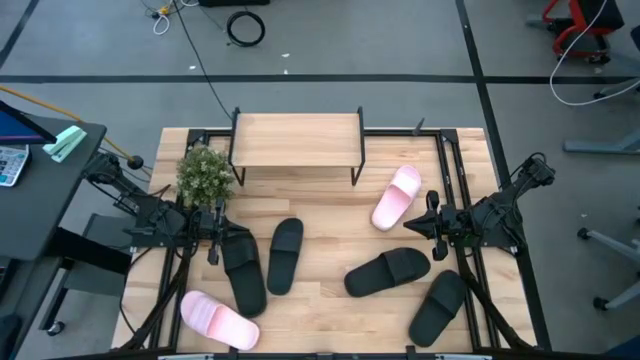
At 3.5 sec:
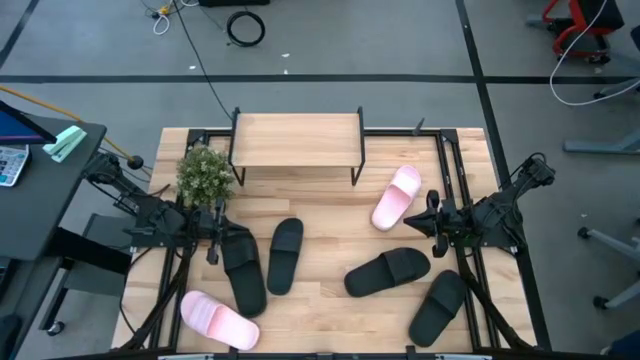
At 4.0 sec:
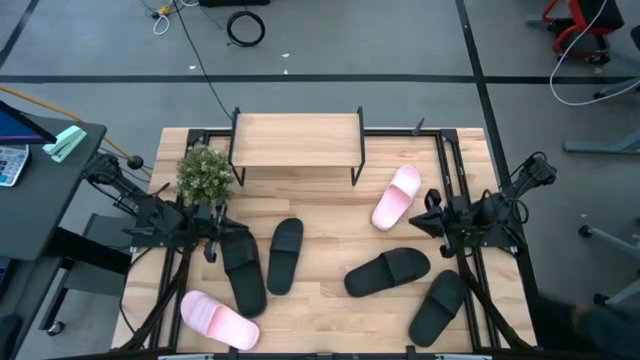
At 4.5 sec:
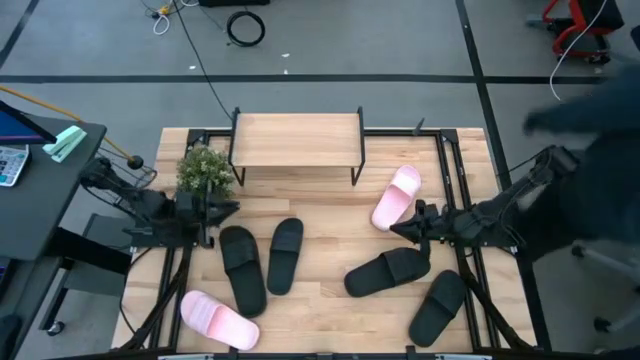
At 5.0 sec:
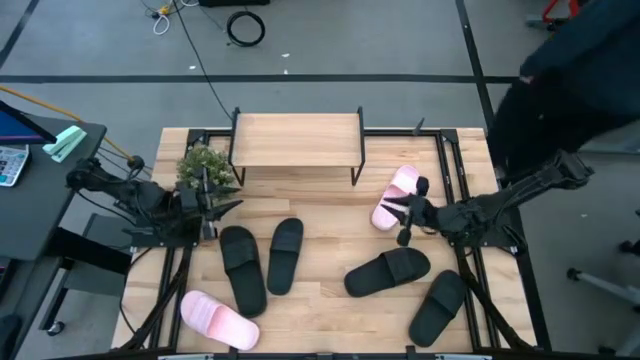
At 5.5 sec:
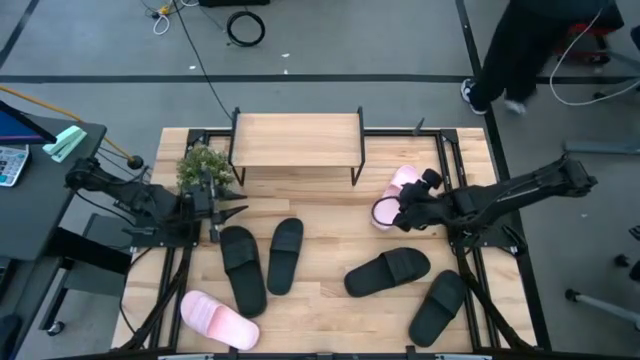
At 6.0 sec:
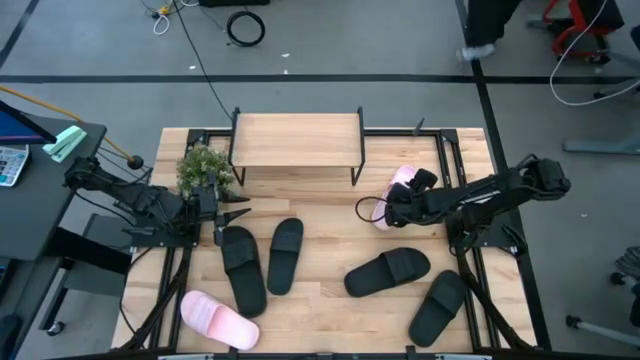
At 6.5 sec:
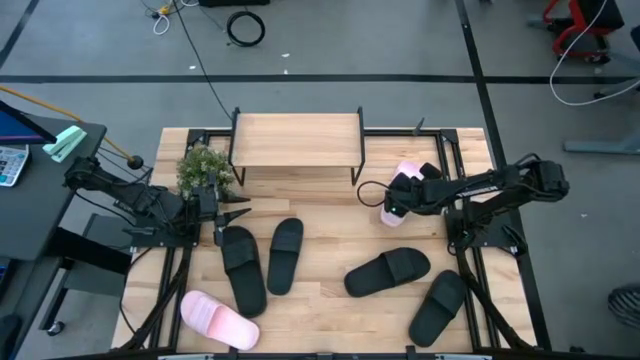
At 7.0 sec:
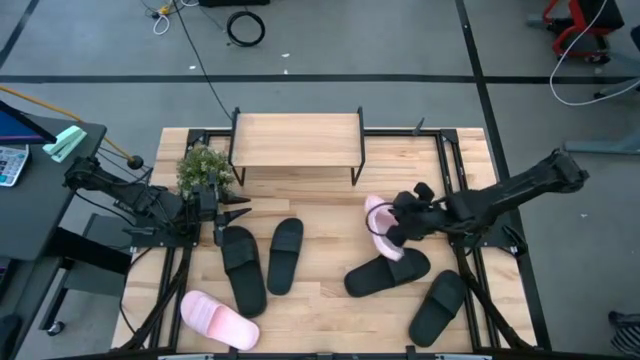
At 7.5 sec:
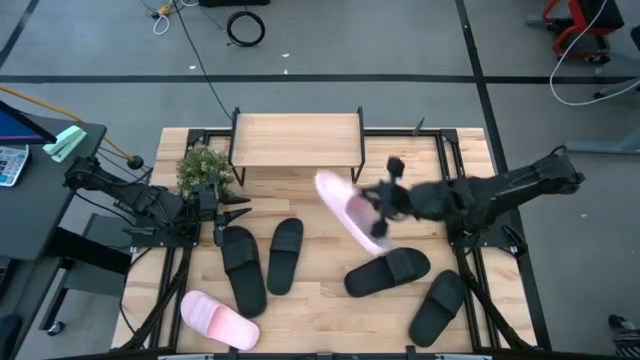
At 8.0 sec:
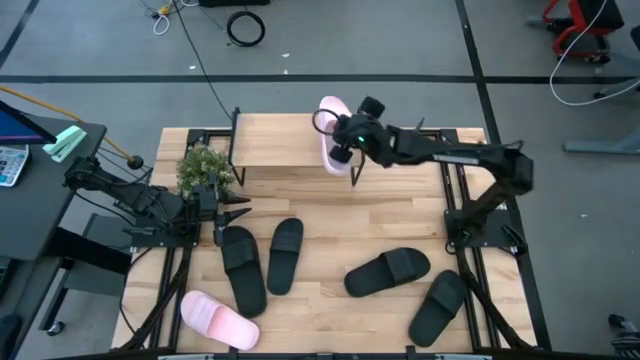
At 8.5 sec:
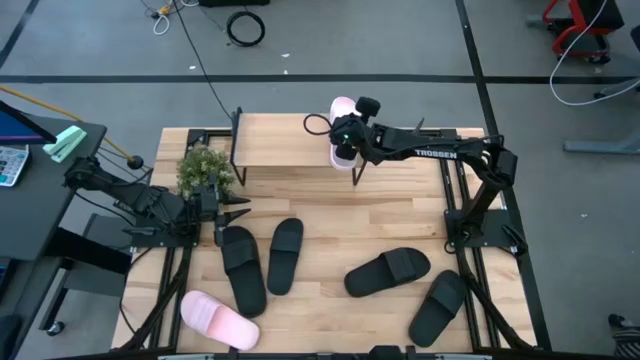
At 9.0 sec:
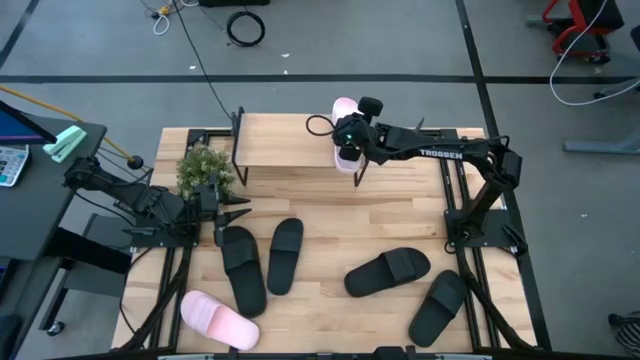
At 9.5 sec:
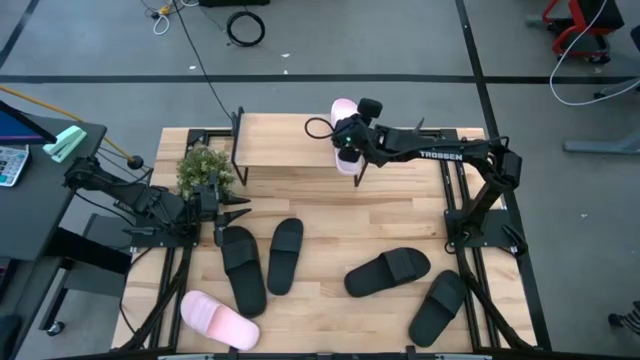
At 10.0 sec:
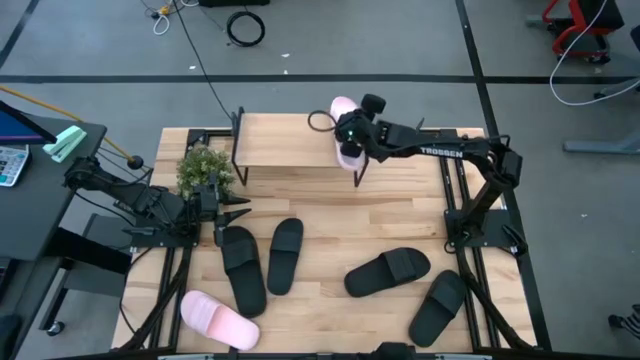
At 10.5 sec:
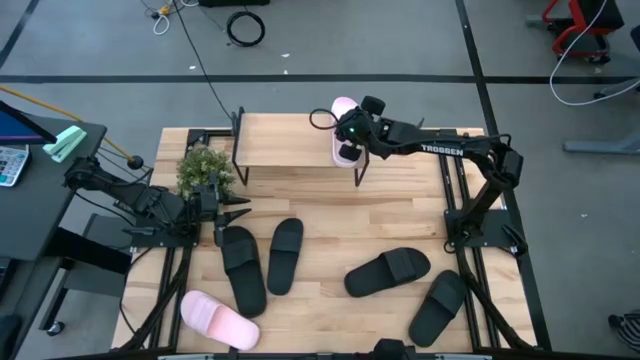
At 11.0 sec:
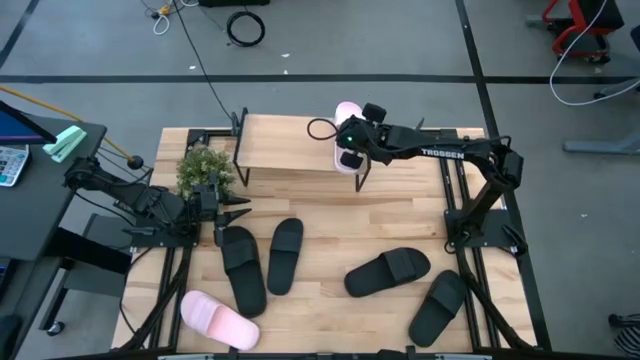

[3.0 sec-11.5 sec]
Task: Pick and place slides into the shelf
Put the right pink slide on the shelf

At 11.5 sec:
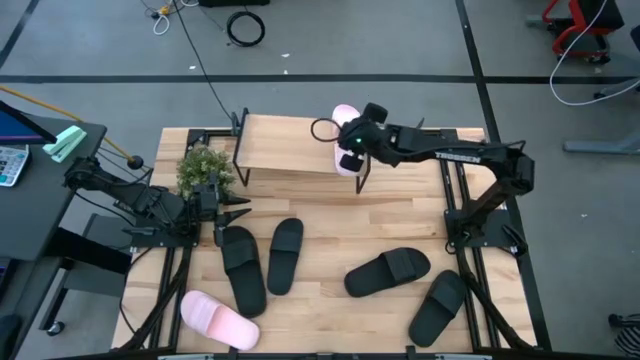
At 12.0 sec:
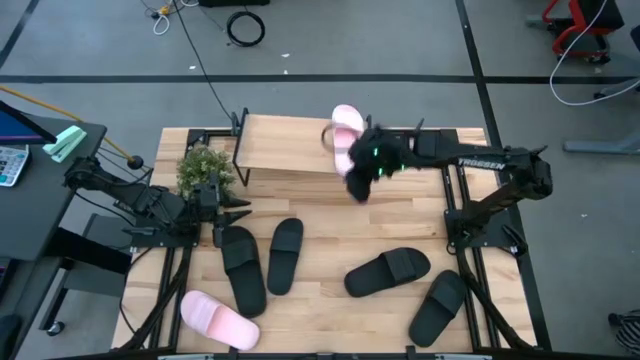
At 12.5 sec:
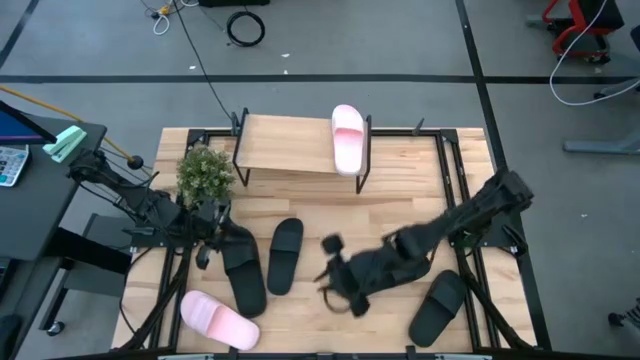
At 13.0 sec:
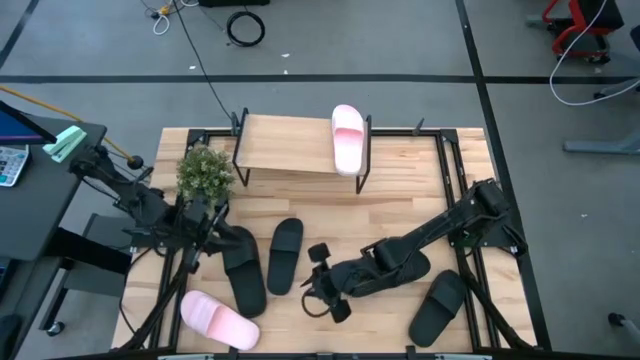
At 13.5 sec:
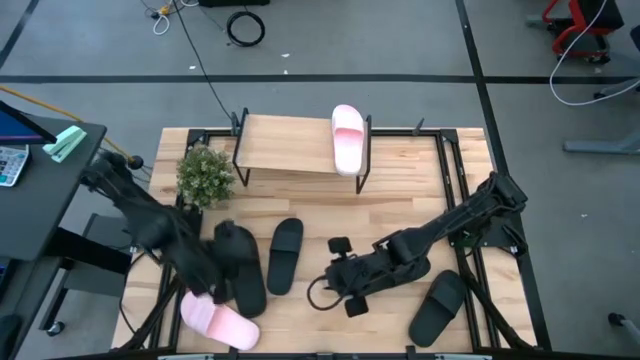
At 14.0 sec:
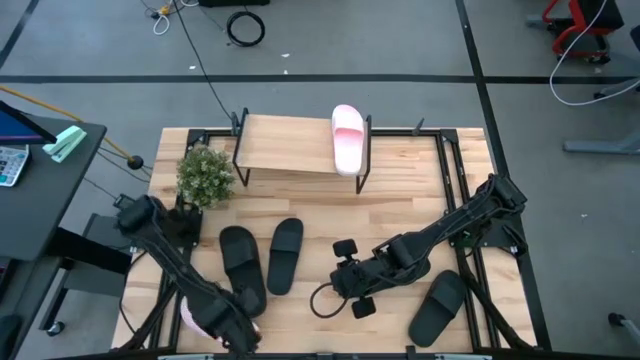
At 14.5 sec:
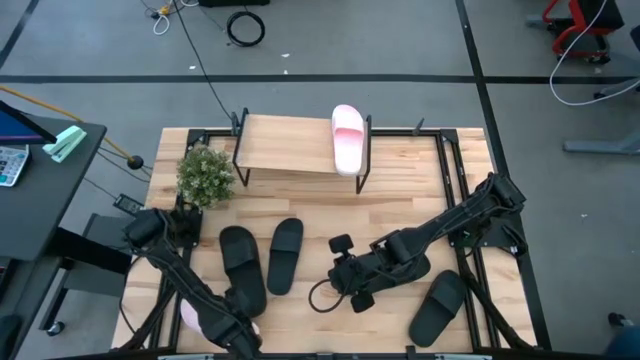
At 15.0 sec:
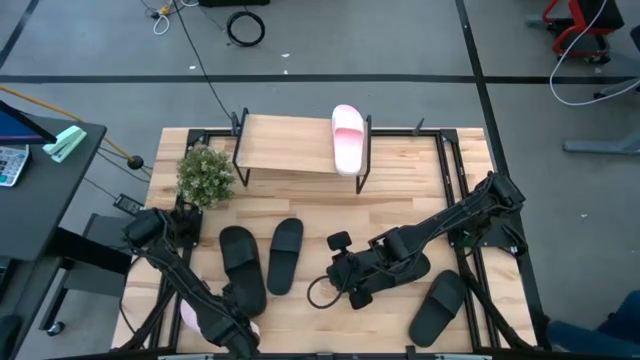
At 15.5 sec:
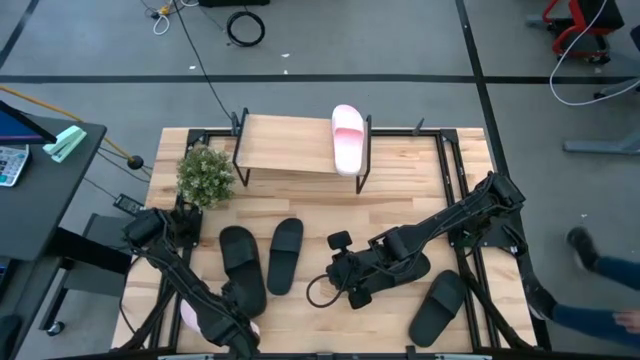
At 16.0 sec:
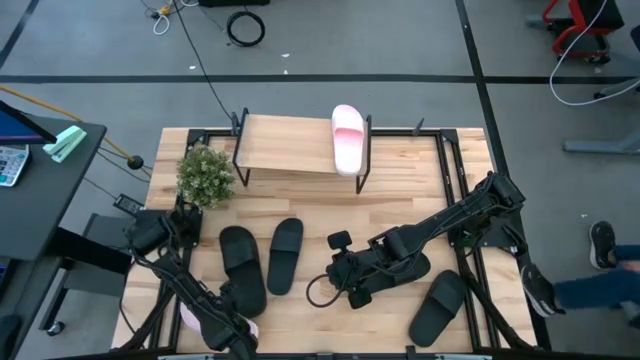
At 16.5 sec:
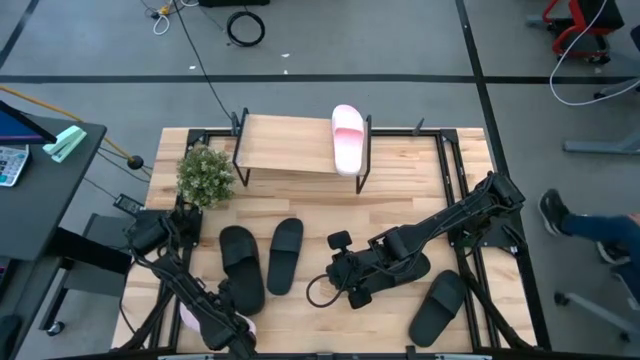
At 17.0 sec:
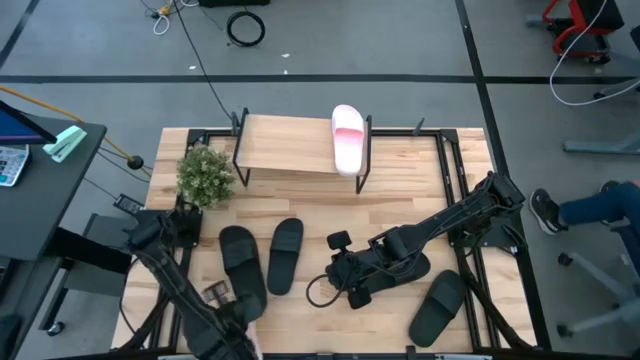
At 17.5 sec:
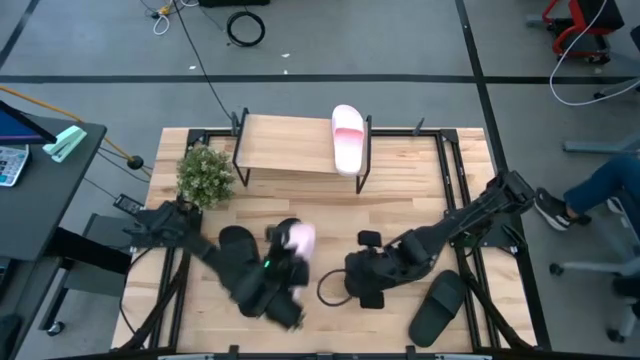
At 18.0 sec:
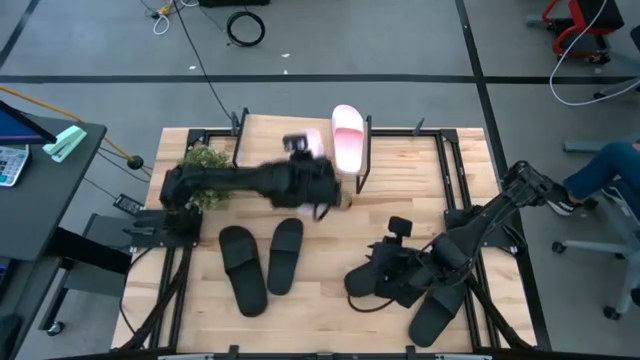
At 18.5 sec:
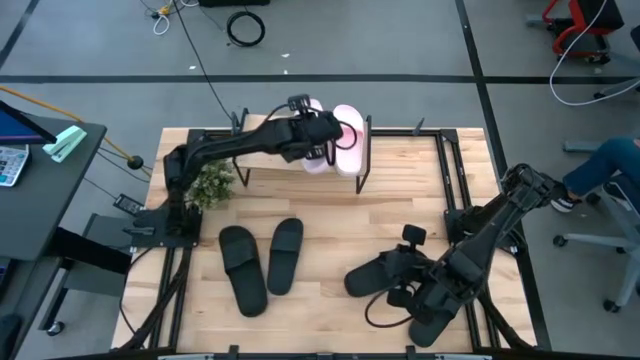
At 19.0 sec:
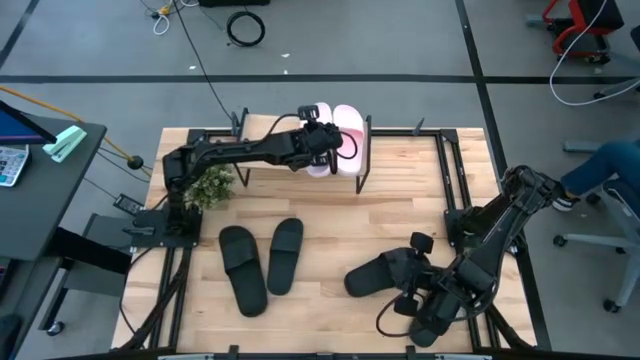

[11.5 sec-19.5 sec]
Put the pink slide on the shelf

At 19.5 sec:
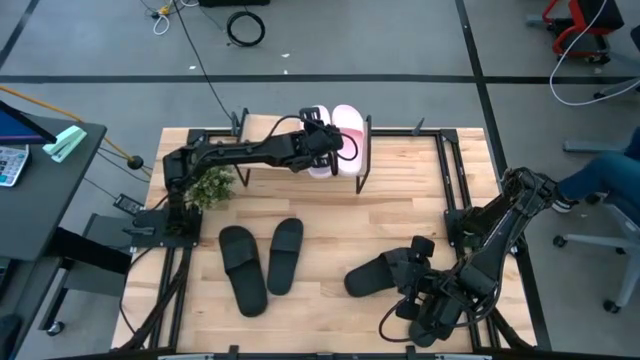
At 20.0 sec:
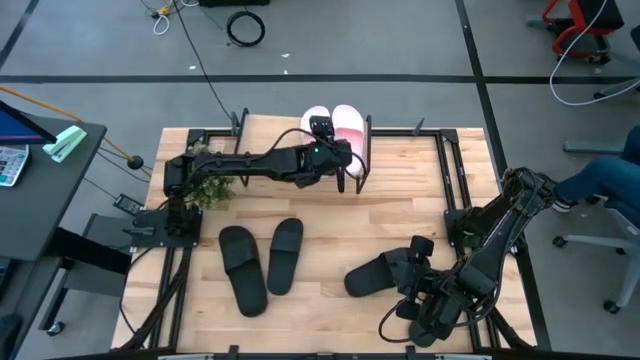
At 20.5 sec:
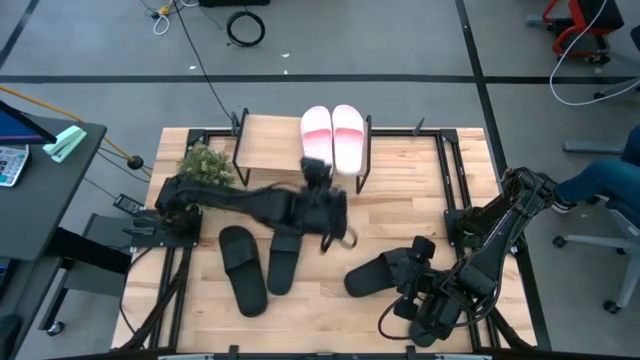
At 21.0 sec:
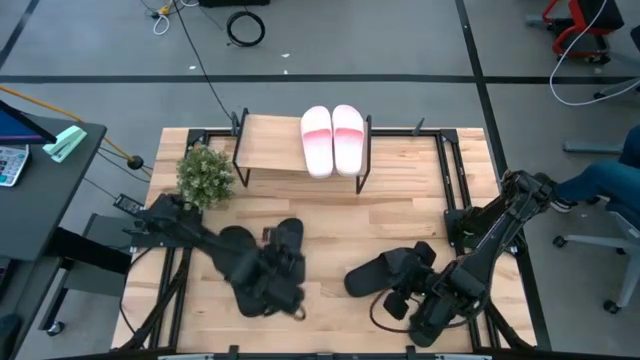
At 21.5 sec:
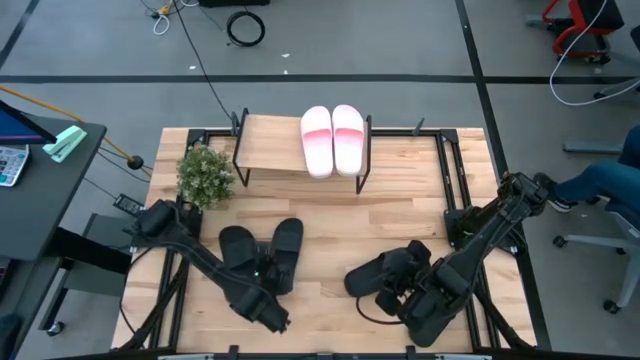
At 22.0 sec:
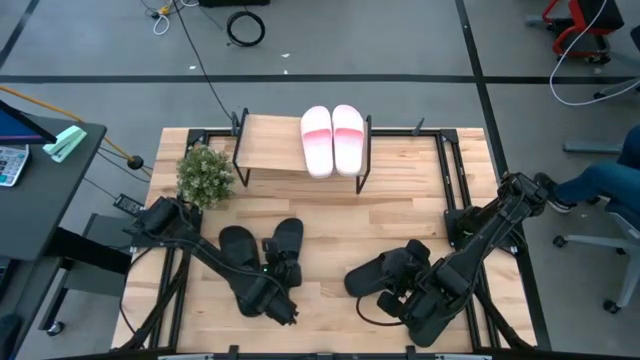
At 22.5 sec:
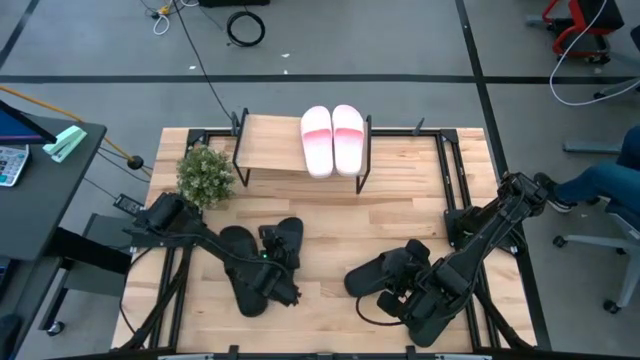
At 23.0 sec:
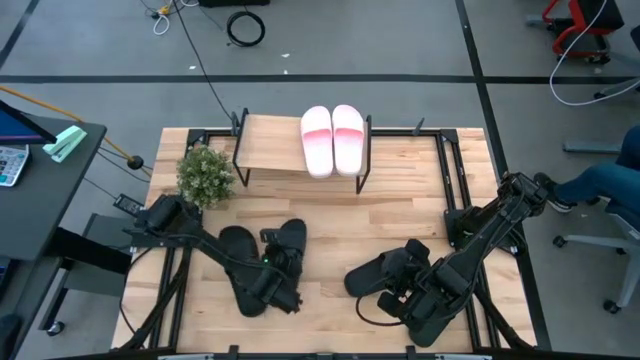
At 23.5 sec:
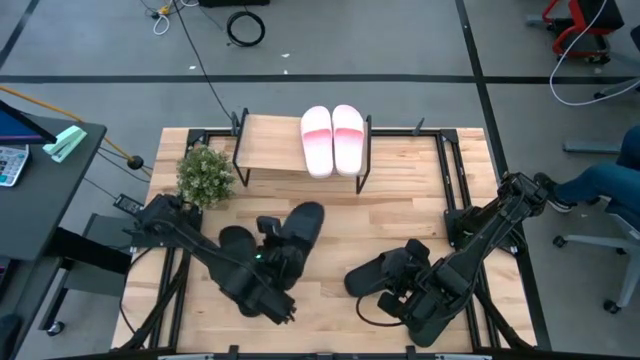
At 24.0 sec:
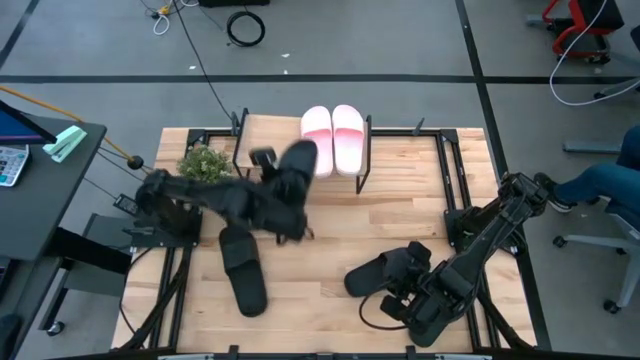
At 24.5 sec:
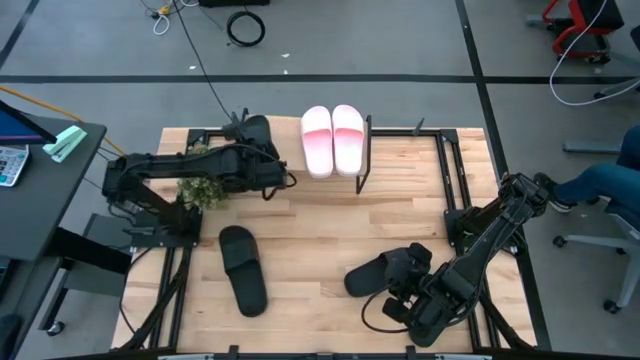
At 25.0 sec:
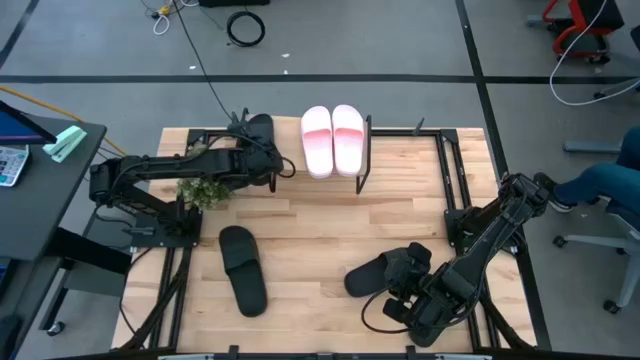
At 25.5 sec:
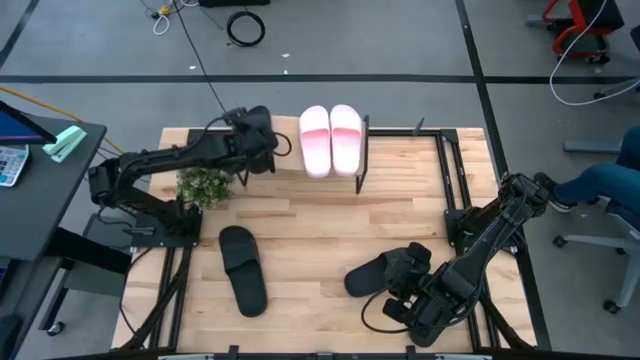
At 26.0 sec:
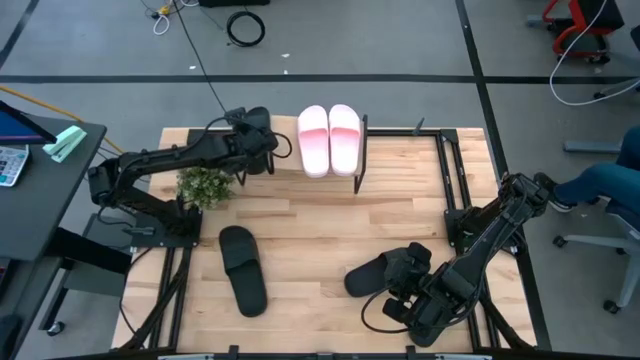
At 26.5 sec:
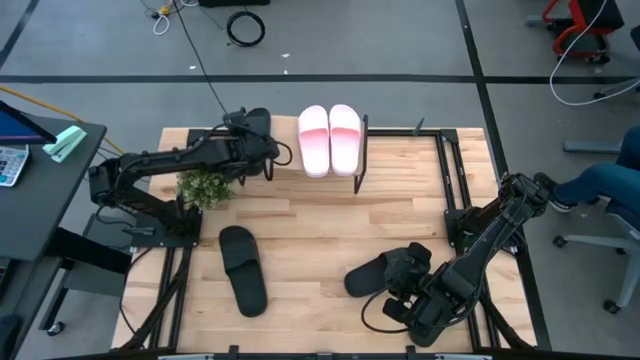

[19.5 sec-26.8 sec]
Put the black slide on the shelf
